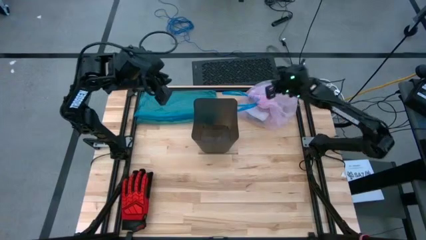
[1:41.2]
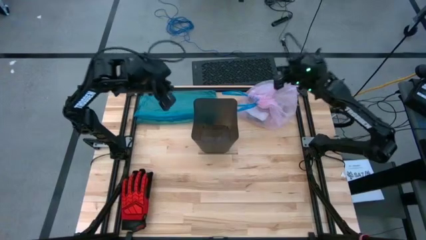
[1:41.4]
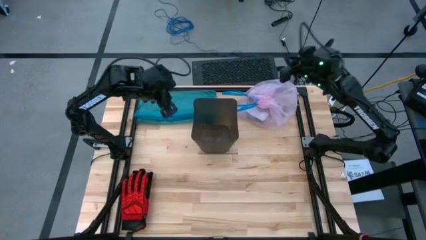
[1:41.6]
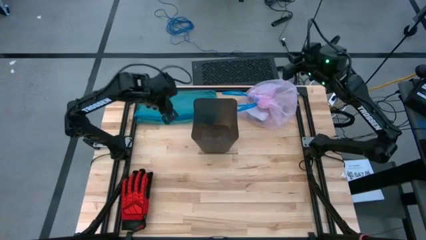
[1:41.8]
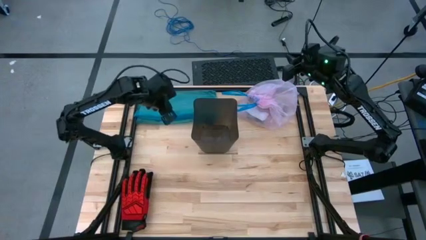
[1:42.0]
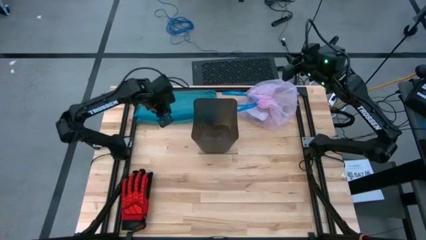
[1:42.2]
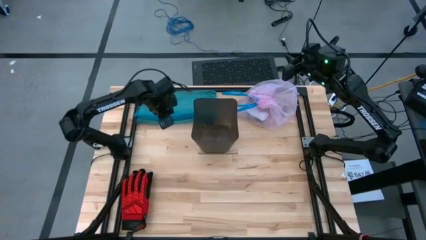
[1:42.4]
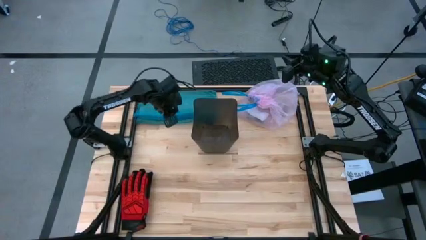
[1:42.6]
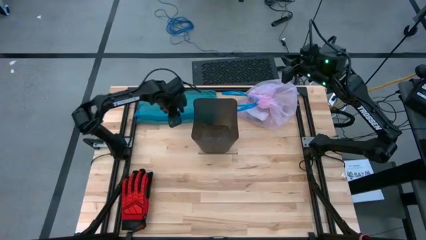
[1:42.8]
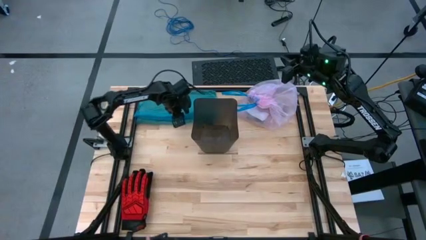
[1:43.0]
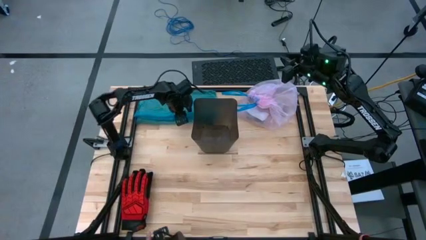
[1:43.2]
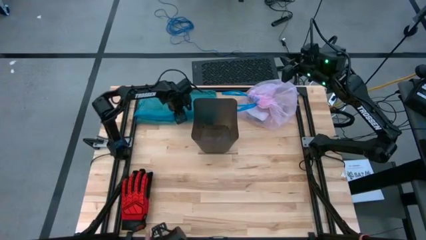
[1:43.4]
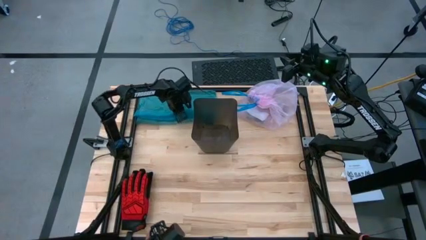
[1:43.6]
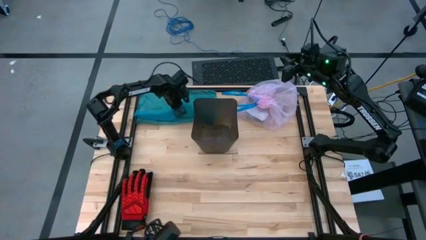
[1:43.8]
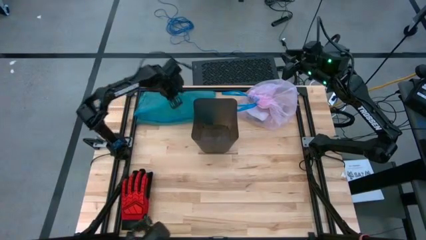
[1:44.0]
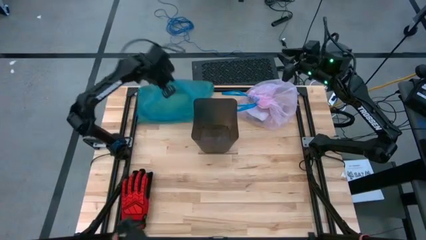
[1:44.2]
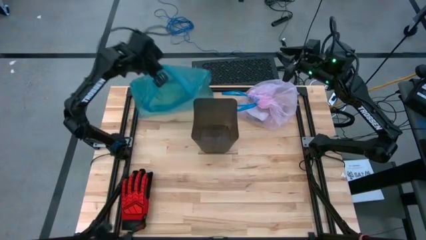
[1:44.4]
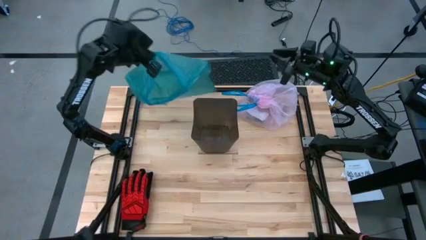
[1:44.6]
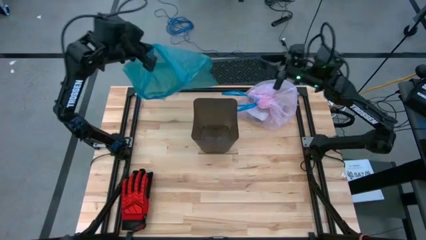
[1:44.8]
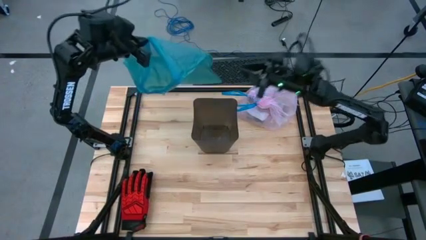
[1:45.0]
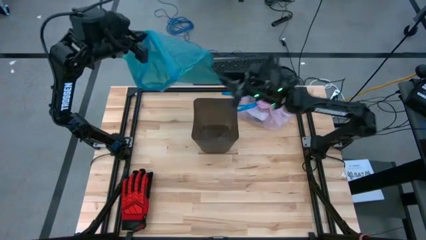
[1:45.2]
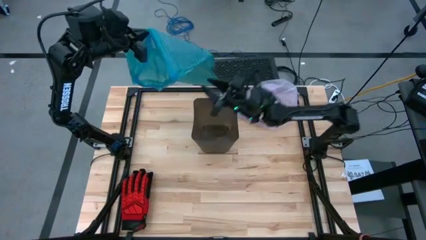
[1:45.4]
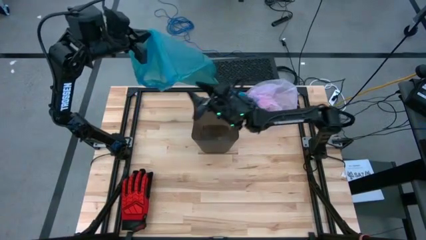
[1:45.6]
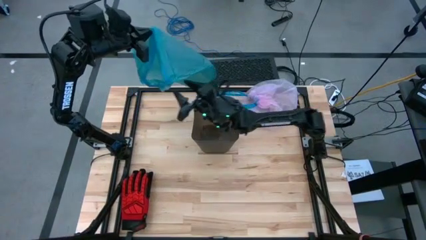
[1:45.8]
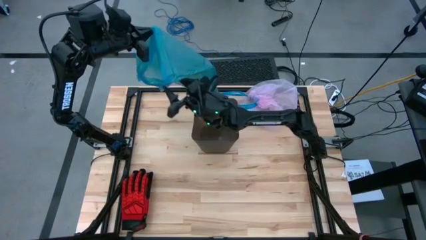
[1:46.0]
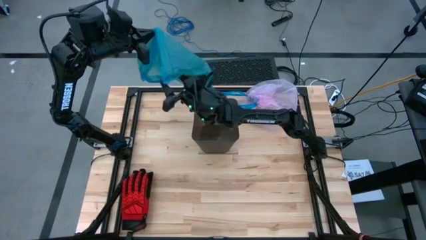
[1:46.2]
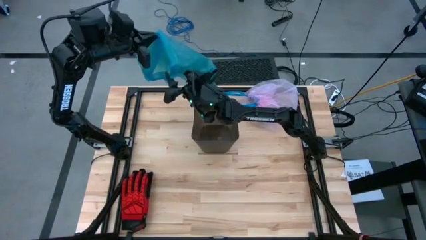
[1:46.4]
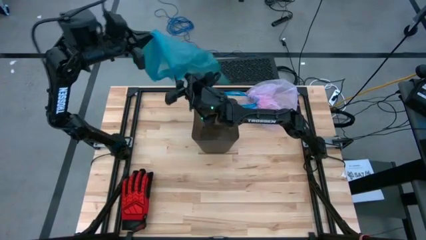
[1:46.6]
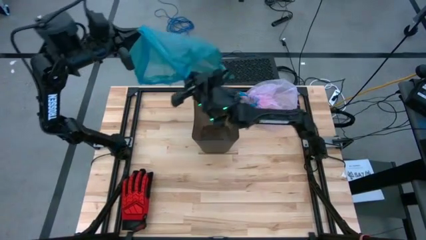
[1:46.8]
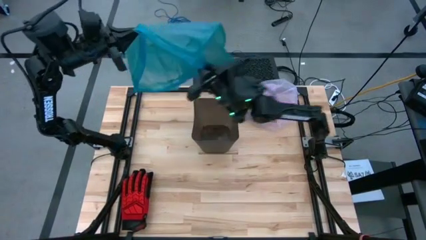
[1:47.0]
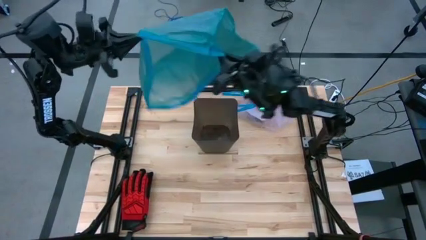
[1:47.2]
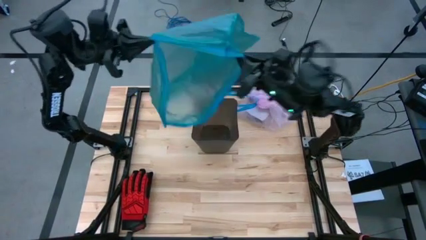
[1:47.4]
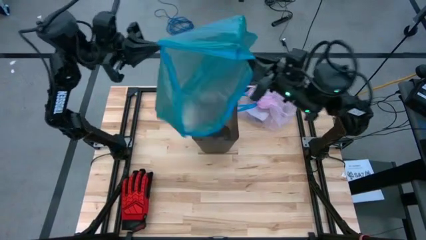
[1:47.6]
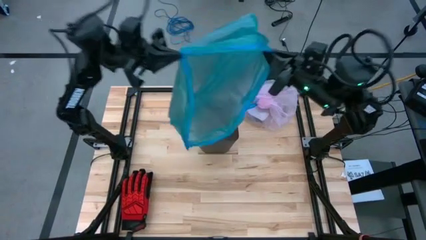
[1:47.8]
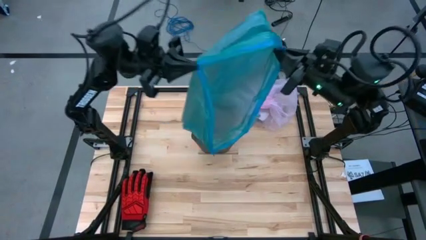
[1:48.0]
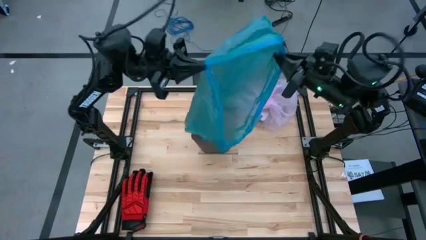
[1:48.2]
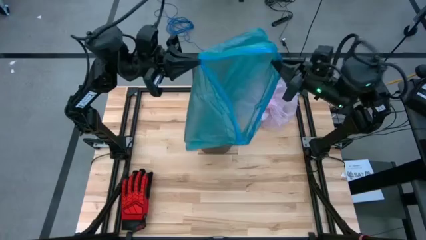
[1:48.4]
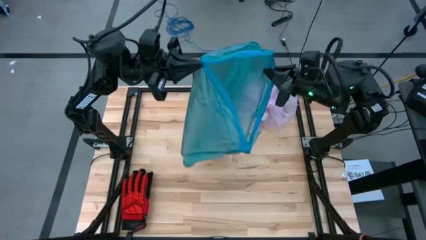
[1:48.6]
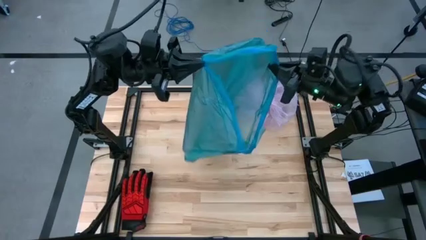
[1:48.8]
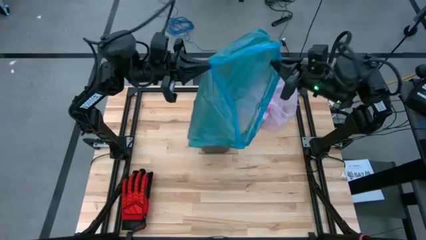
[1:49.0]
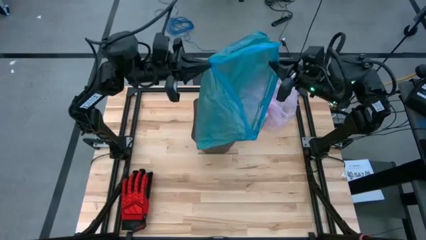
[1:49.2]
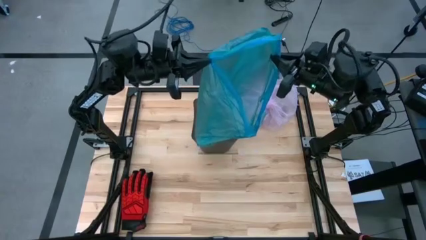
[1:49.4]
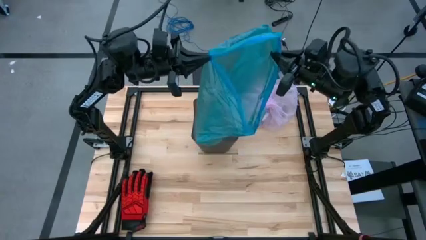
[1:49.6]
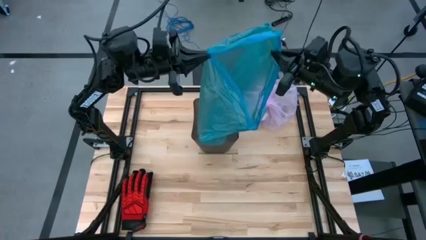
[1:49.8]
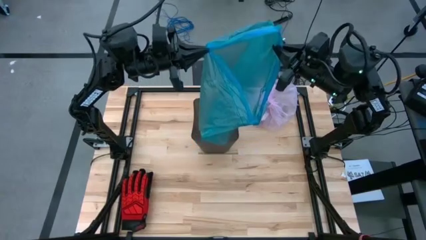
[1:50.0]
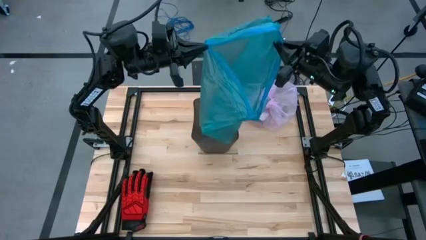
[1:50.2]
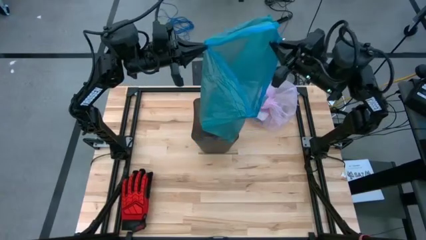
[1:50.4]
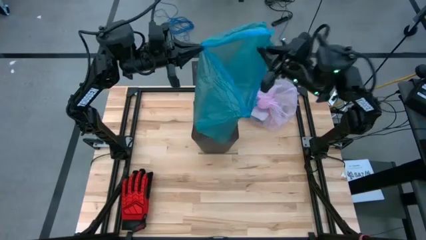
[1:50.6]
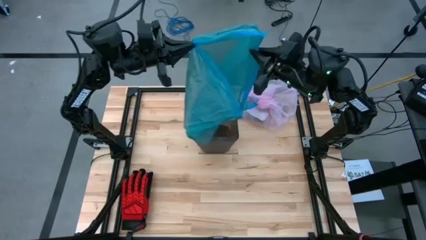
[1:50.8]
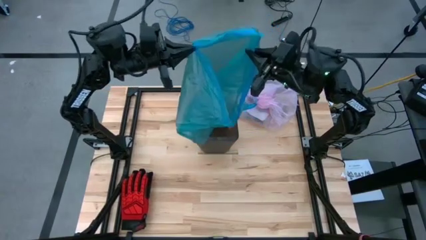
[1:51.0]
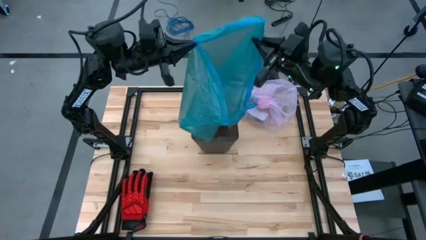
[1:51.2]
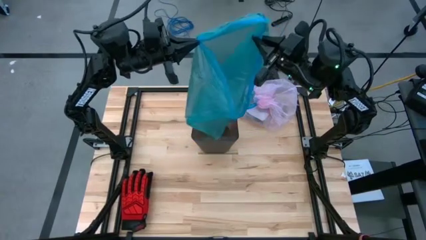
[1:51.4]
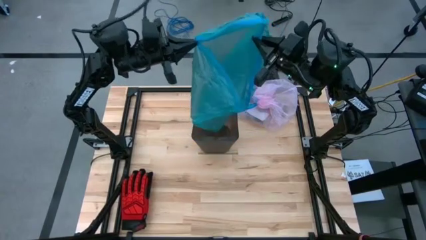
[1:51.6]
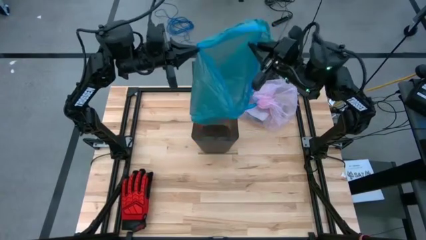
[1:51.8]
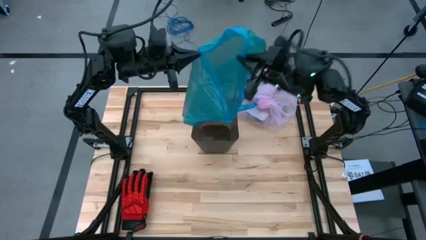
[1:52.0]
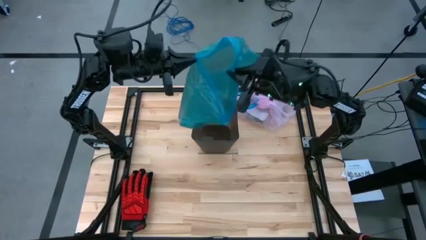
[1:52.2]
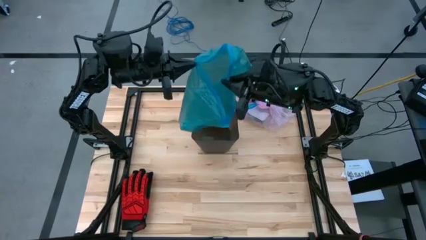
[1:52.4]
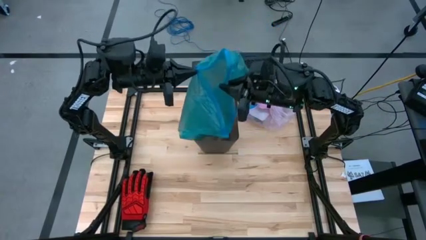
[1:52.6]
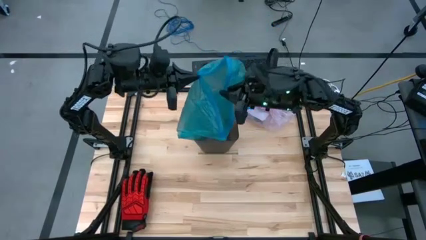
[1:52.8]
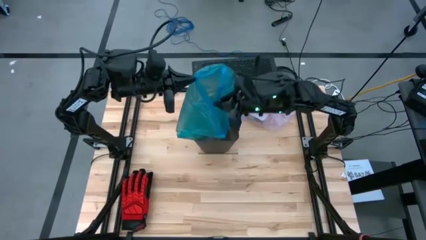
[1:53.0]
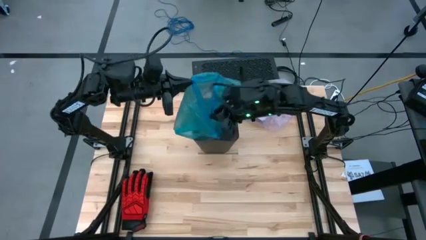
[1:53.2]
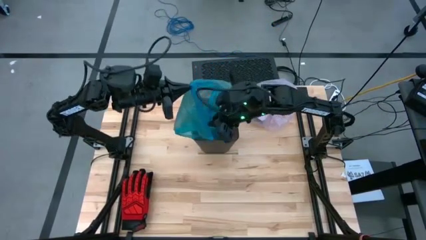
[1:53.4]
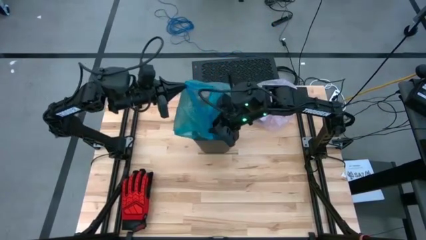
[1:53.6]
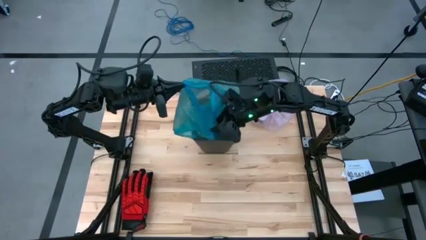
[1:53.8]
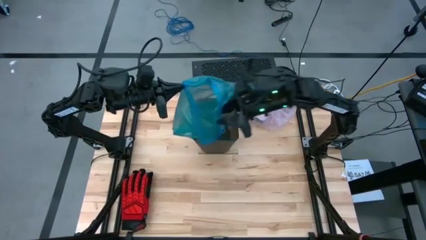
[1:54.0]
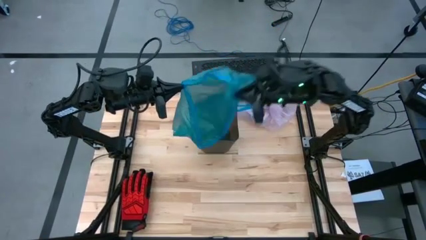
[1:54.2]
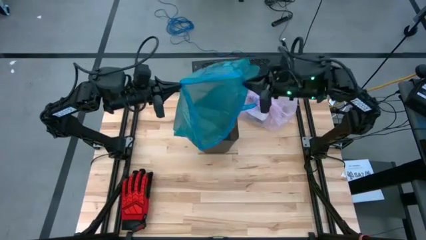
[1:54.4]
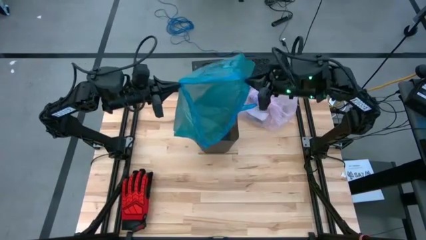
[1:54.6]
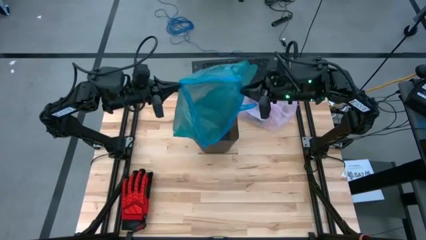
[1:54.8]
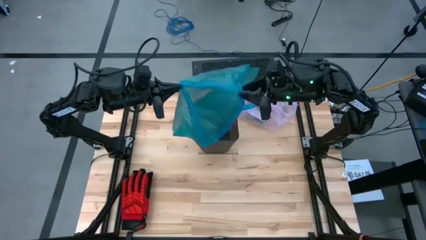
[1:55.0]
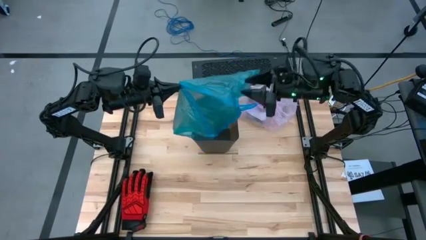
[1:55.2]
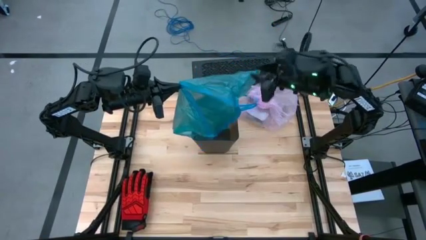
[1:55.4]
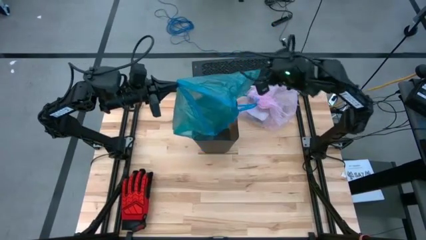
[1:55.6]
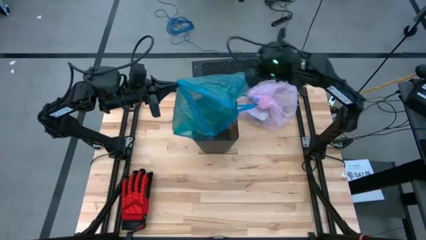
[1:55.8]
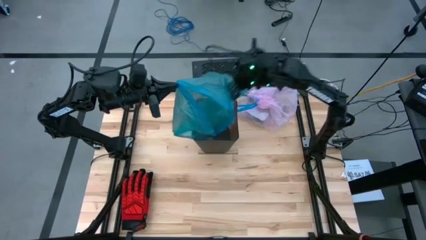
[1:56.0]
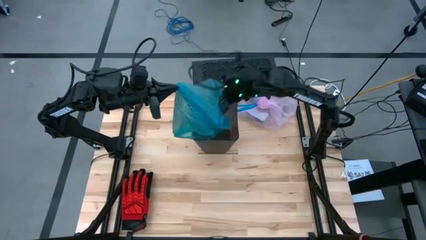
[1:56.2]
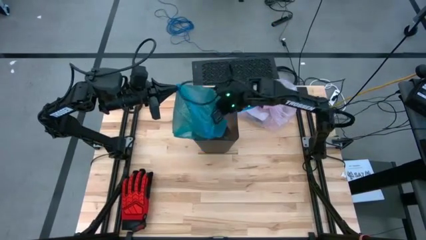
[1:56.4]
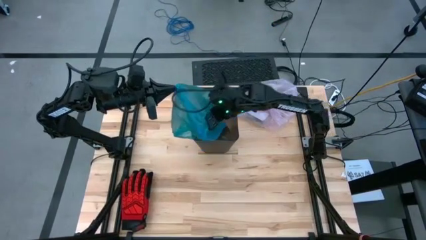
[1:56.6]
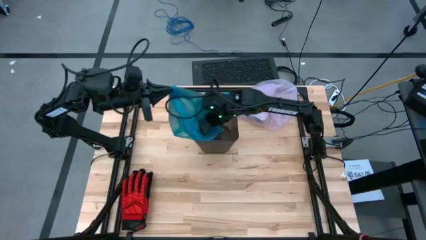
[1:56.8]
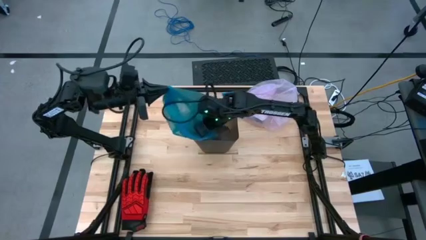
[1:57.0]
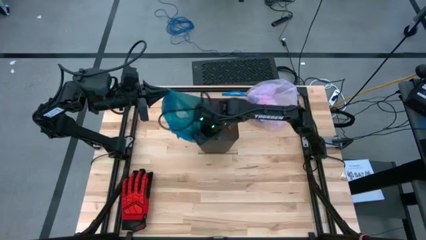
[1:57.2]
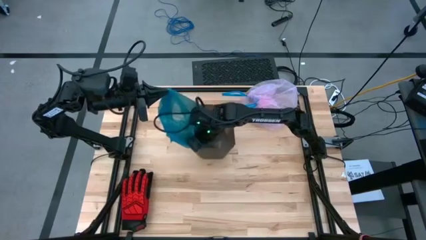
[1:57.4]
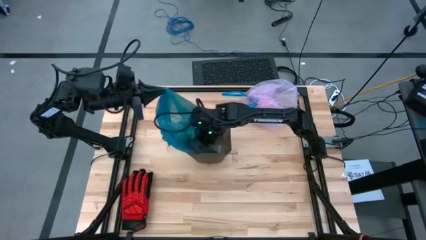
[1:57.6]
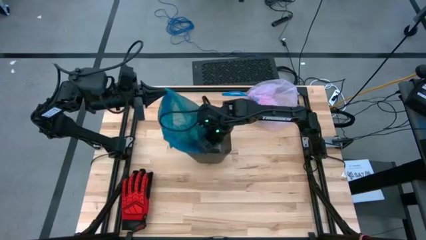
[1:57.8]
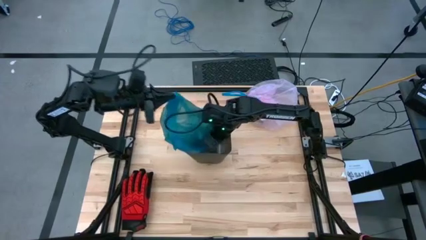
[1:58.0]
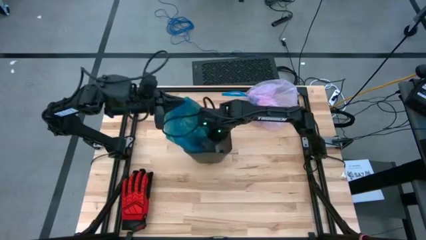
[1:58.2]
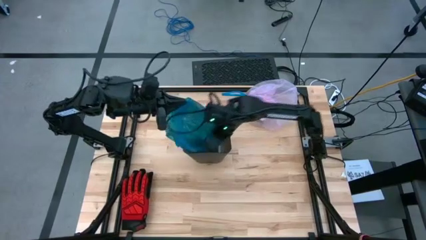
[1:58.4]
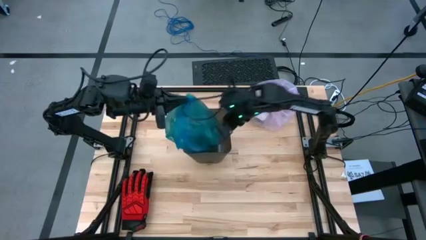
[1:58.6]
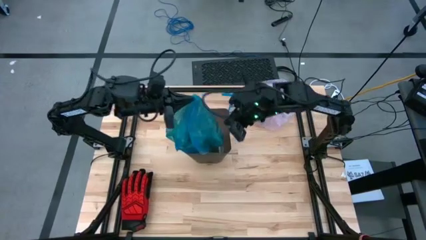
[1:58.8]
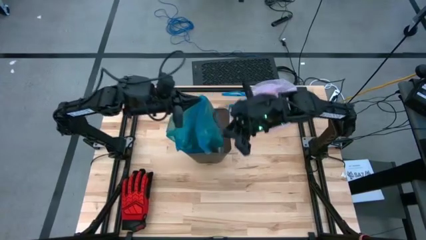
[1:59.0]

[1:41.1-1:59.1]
Task: place trash/remove bag and relplace
Insert the blue trash bag into the trash bin
